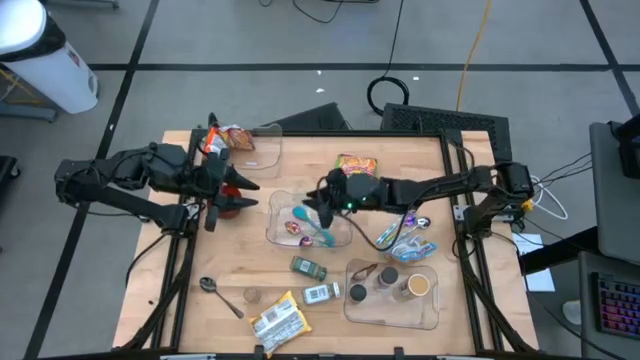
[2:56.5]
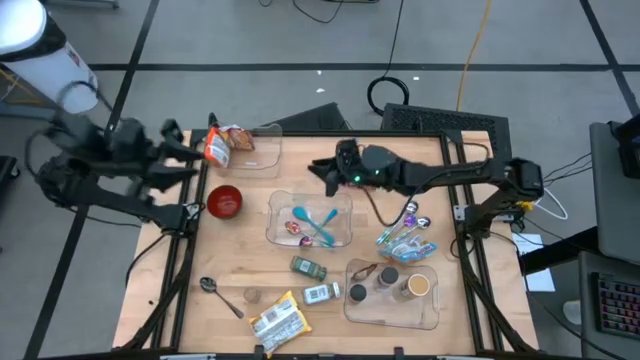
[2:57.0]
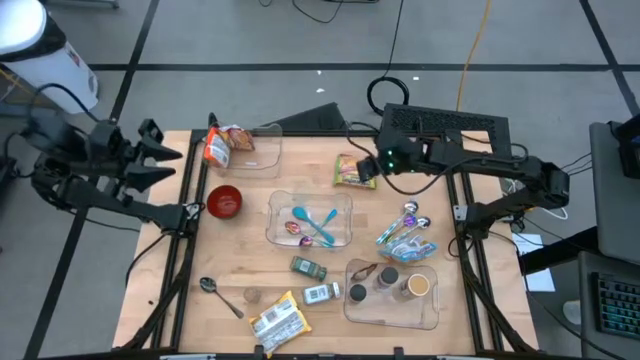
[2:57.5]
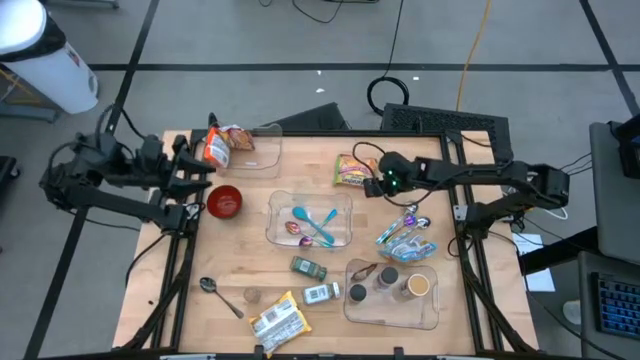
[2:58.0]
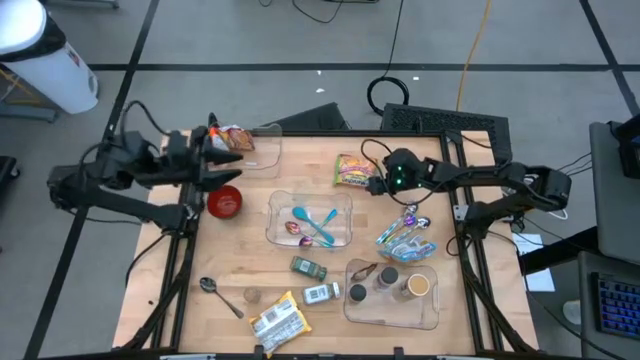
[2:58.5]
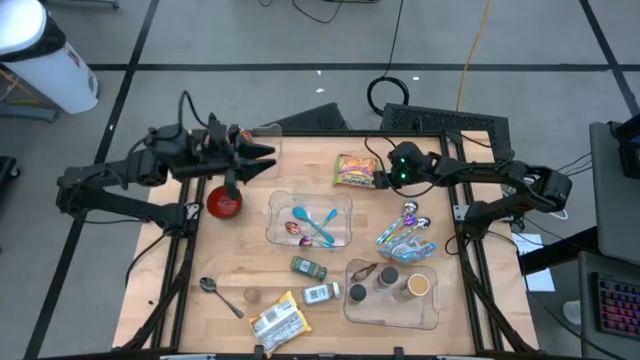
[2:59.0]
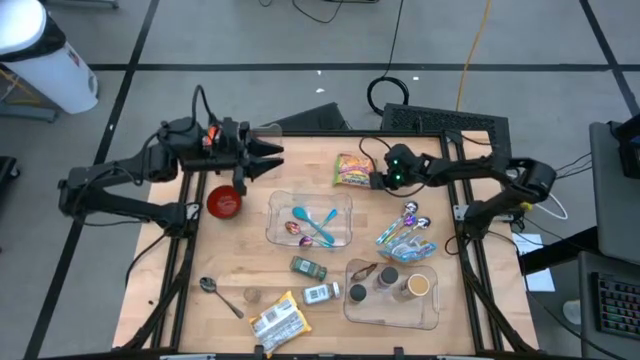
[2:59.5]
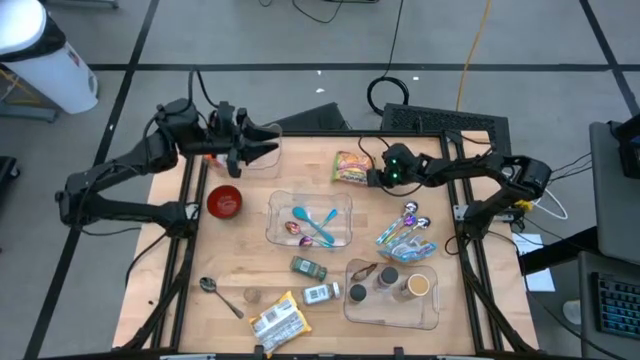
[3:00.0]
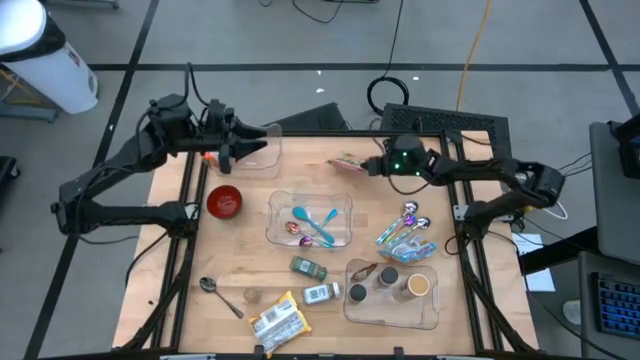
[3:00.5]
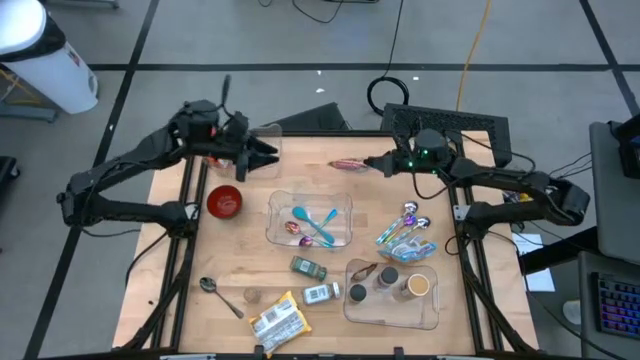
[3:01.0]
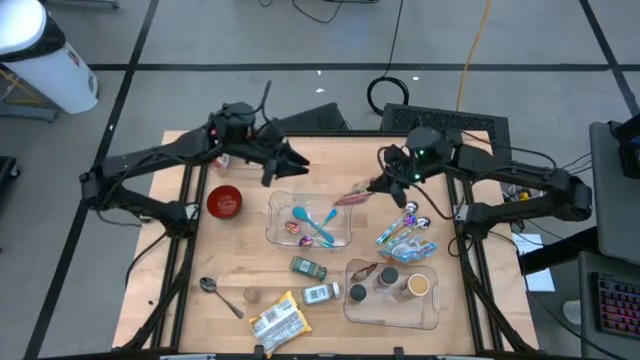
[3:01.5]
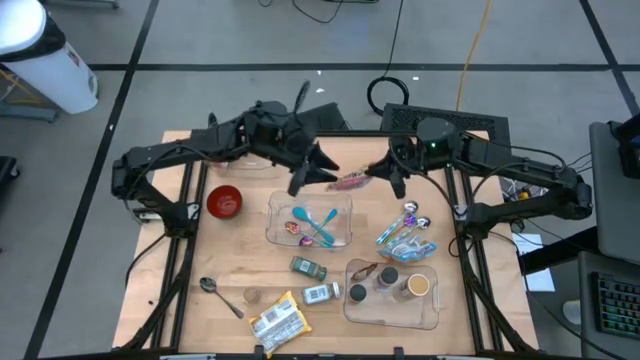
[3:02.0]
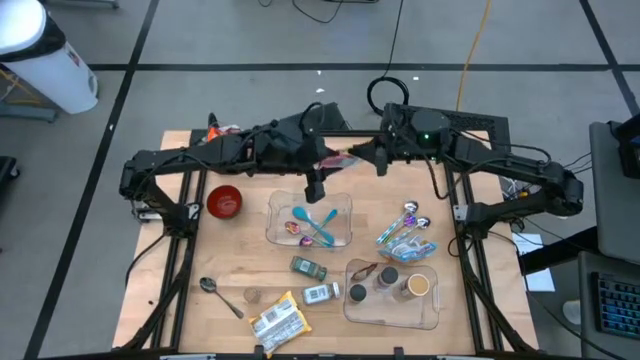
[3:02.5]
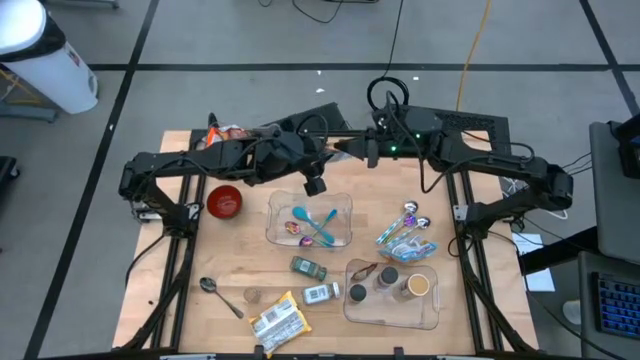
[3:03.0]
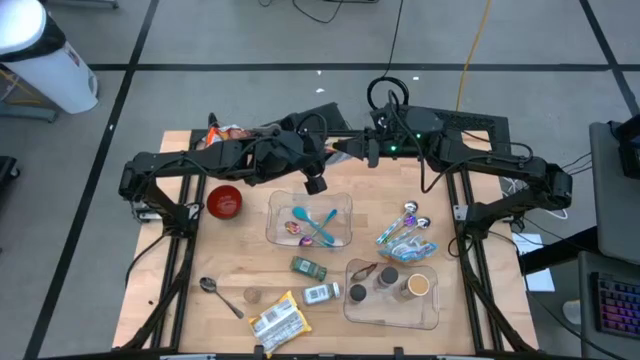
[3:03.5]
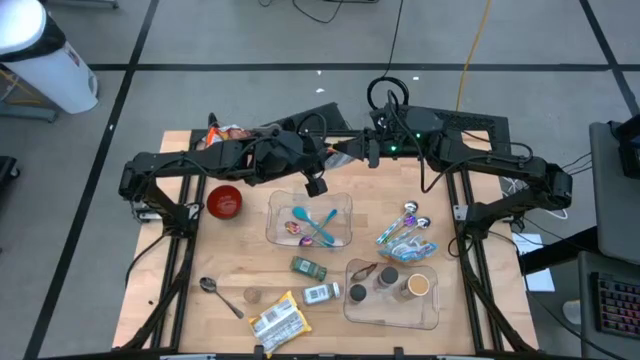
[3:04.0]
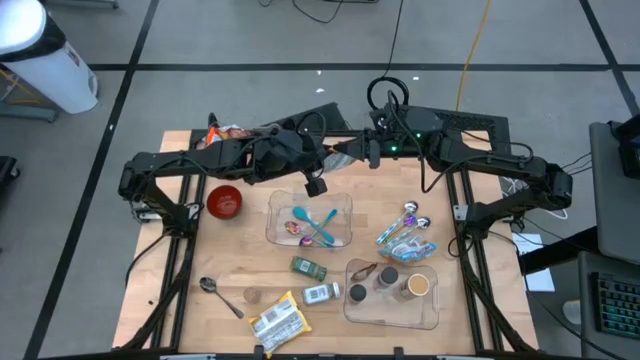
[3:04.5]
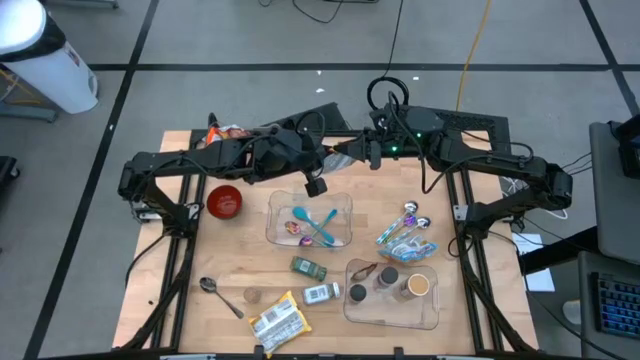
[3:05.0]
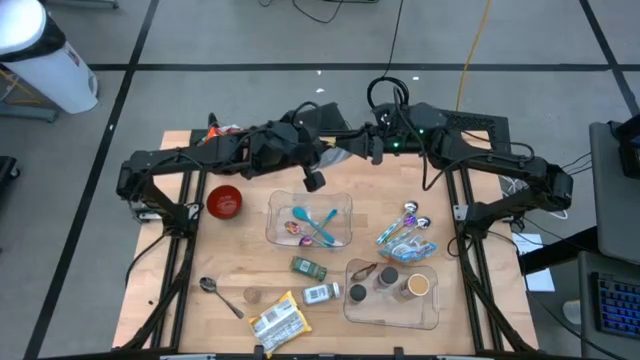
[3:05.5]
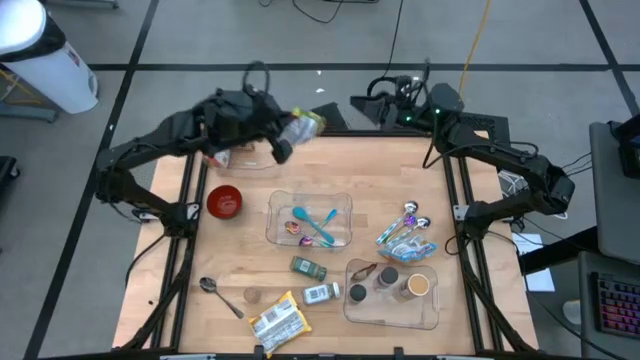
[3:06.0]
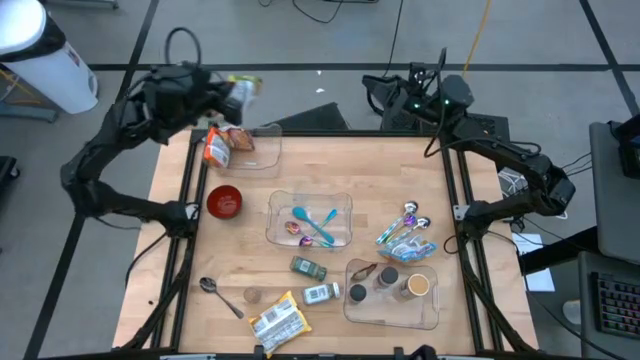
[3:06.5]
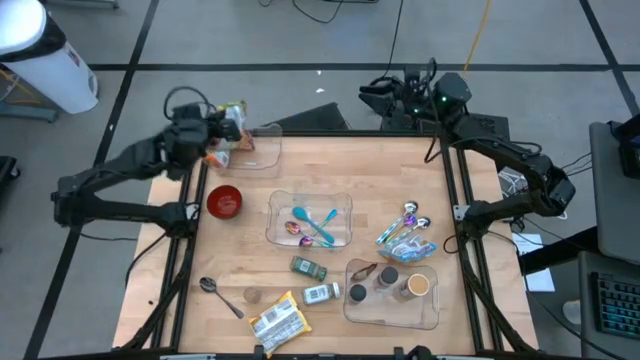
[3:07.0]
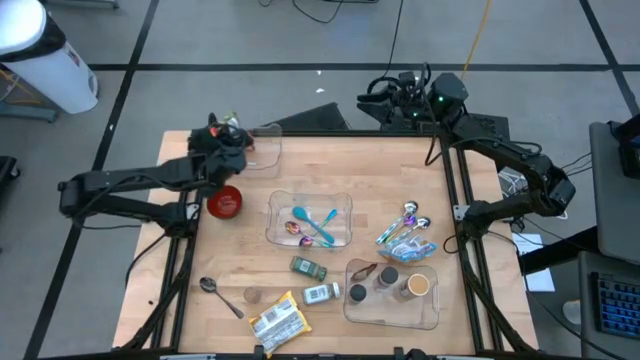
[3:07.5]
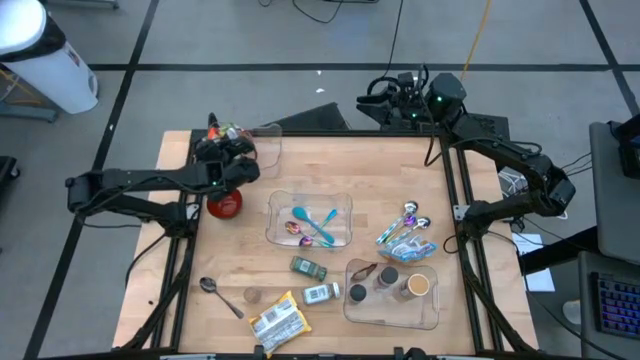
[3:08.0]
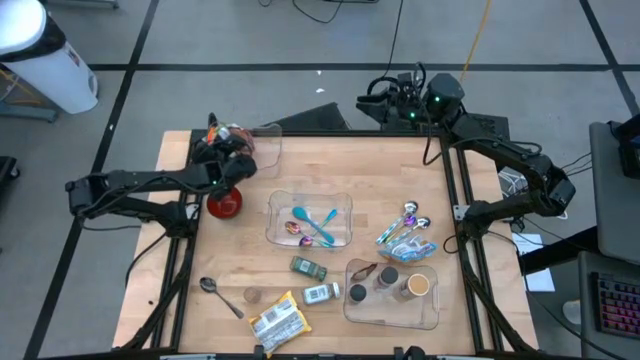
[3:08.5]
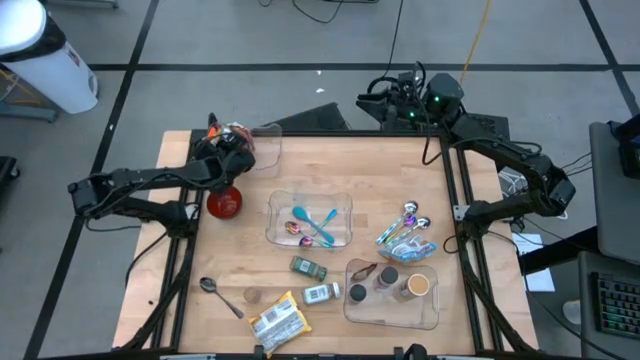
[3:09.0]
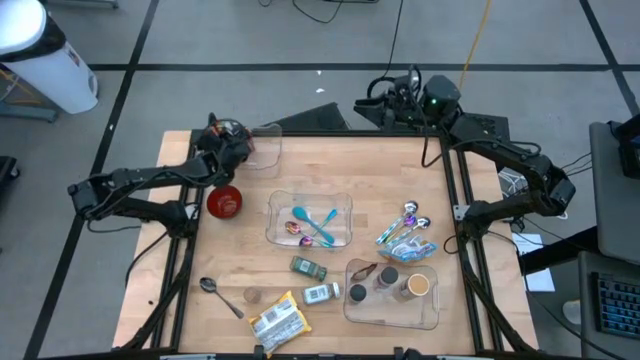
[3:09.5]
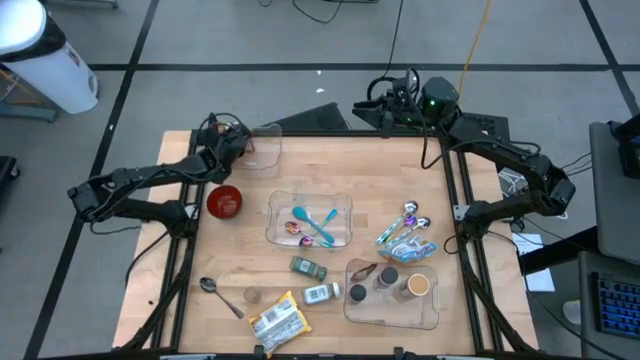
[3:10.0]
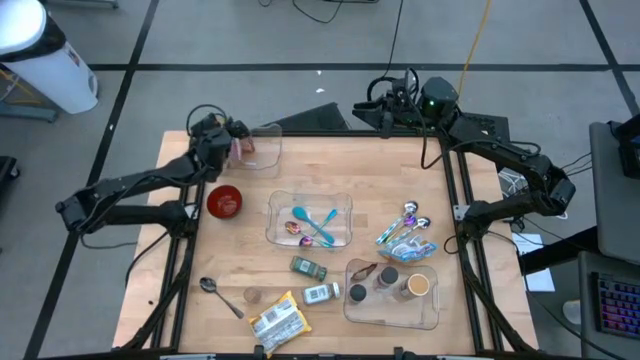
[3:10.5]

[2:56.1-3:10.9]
Task: Pick & Place Food Item
Put the green noodle pack into the top transparent bin

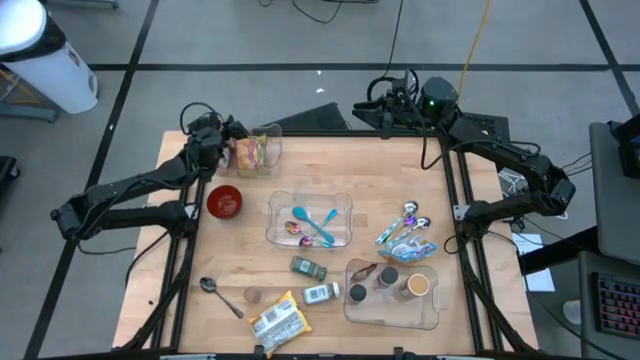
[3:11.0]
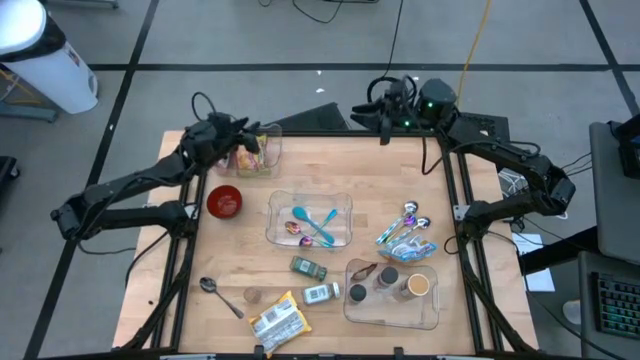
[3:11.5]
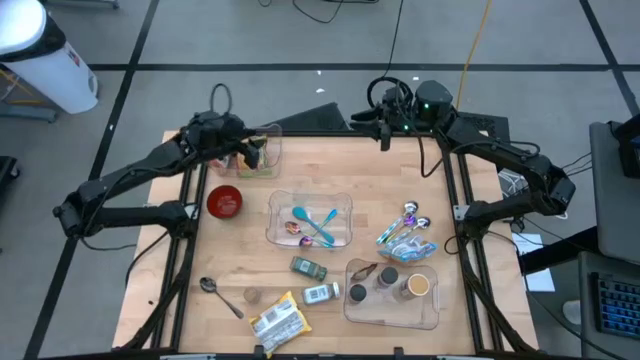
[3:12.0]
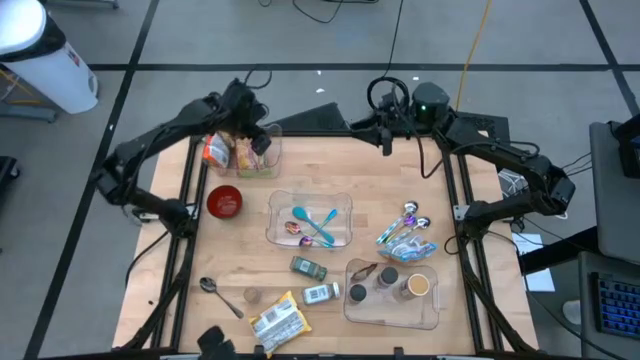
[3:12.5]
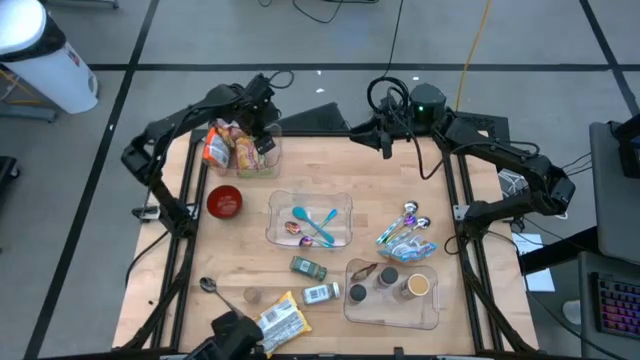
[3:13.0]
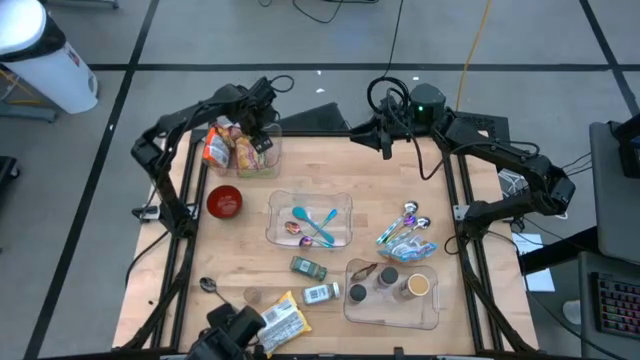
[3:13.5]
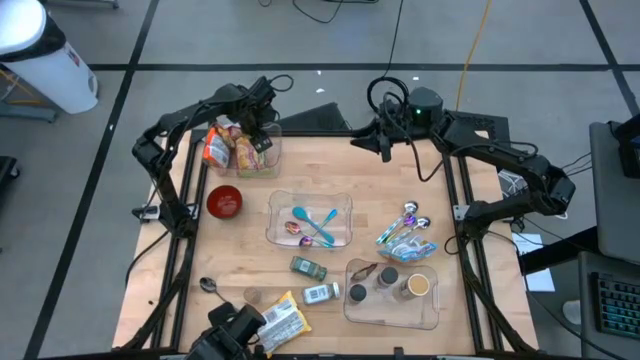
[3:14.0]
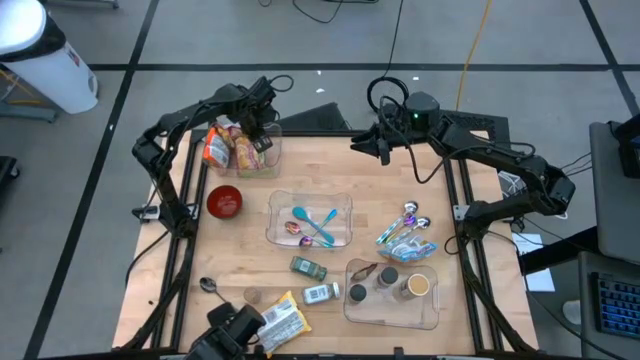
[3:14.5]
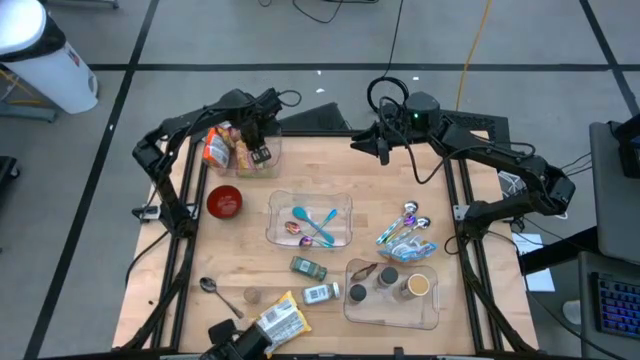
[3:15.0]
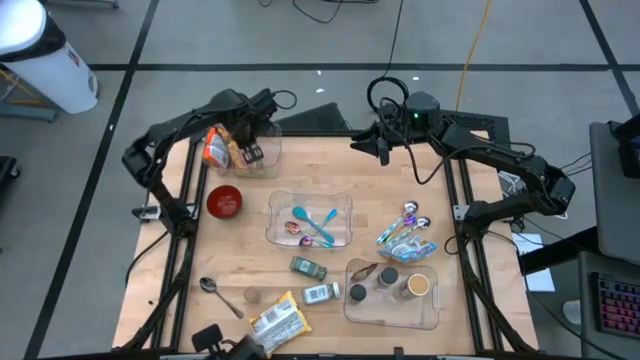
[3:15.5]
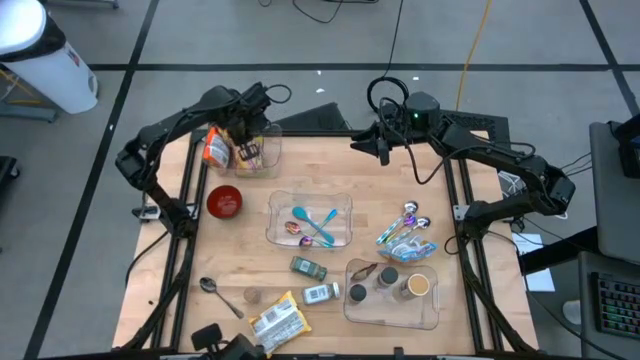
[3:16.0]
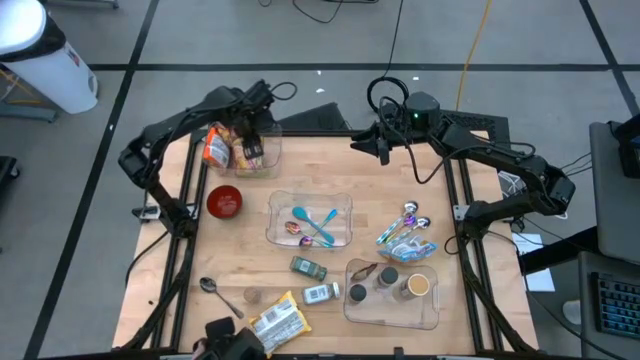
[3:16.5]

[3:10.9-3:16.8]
Adjust the green noodle pack in the top transparent bin

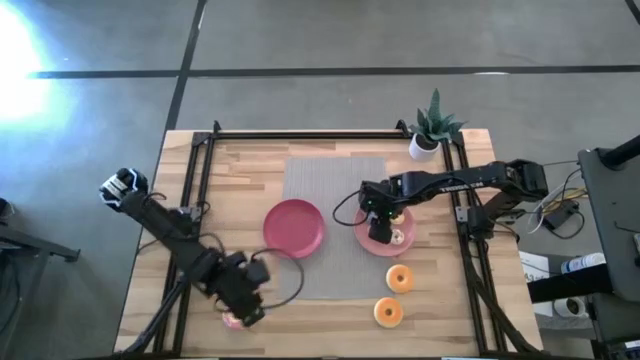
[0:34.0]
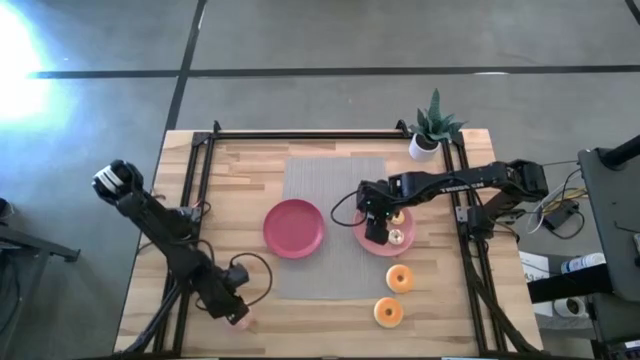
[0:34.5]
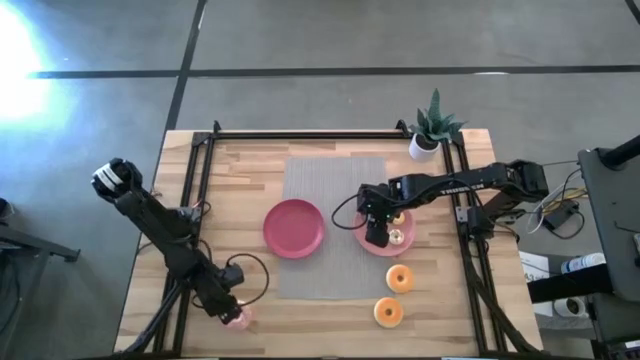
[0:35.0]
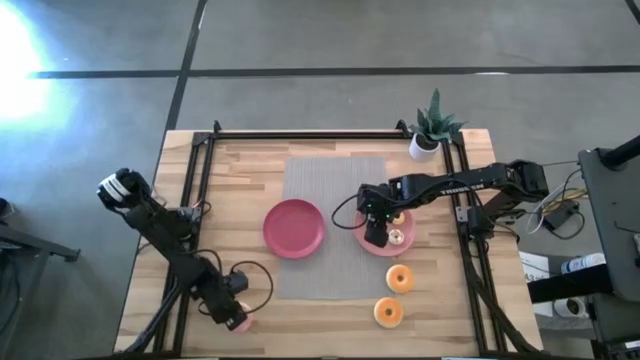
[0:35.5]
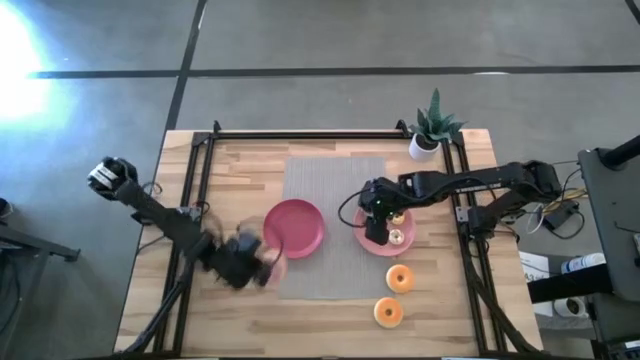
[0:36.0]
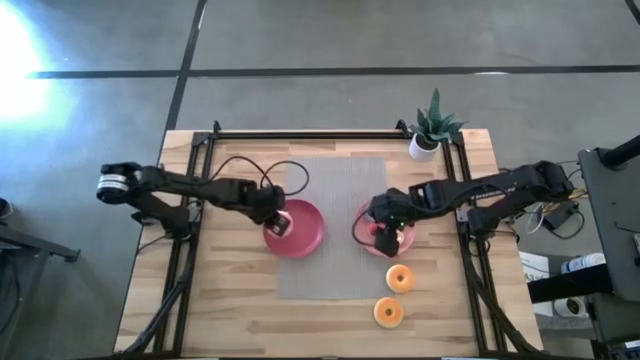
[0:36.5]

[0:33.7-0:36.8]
Task: Pick & Place donuts
Put the large pink donut on the pink plate
